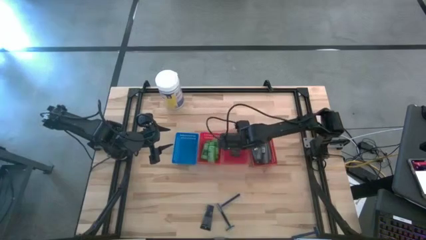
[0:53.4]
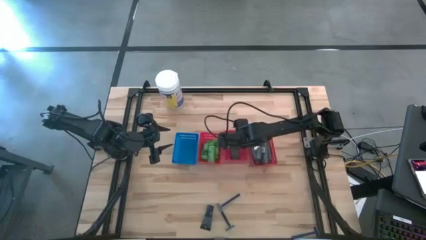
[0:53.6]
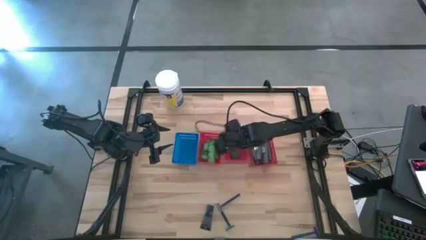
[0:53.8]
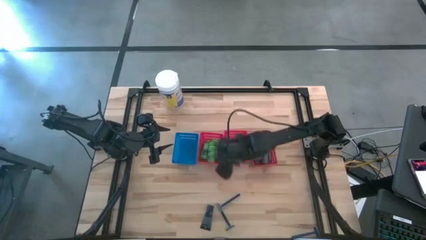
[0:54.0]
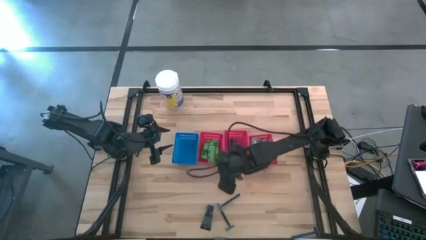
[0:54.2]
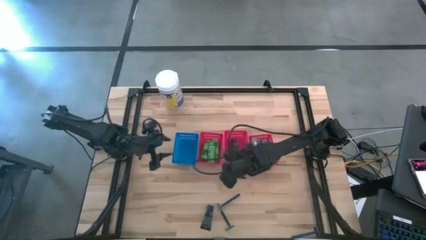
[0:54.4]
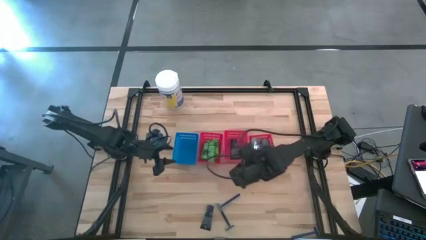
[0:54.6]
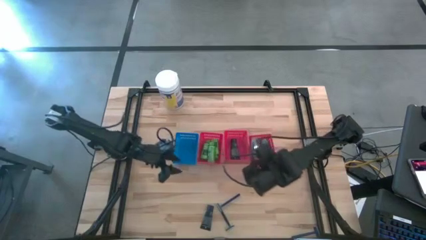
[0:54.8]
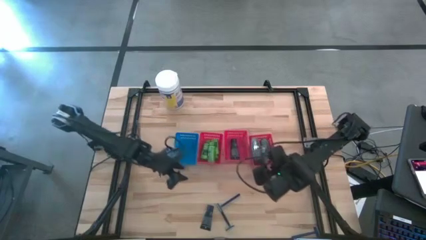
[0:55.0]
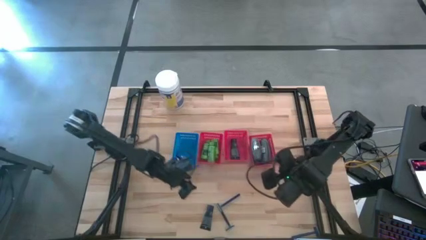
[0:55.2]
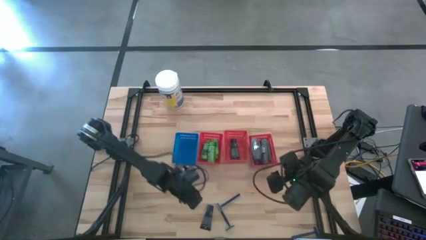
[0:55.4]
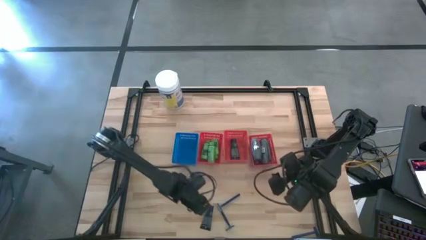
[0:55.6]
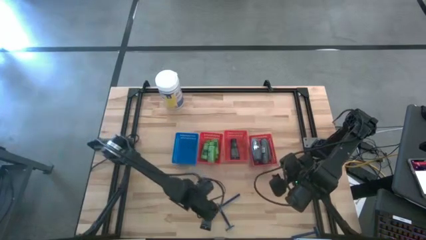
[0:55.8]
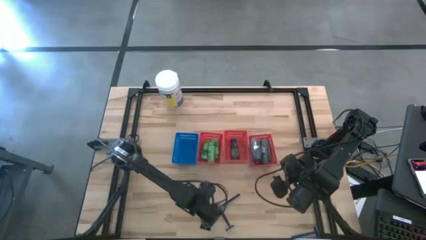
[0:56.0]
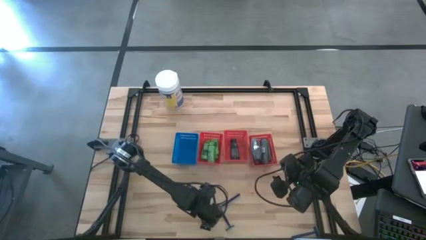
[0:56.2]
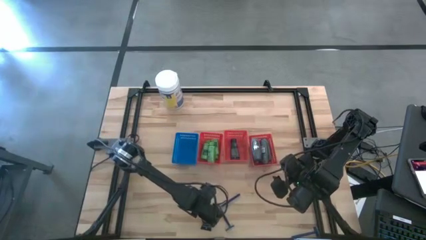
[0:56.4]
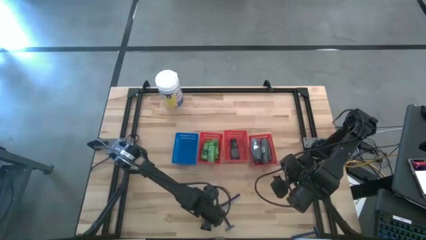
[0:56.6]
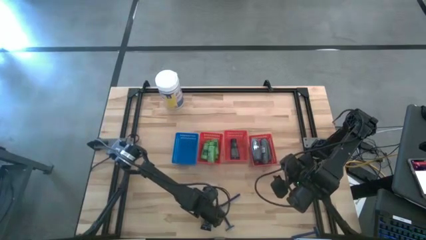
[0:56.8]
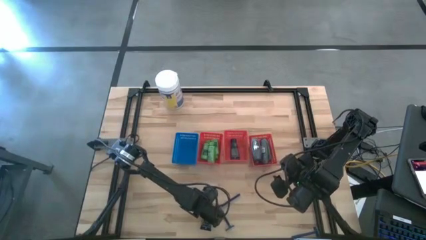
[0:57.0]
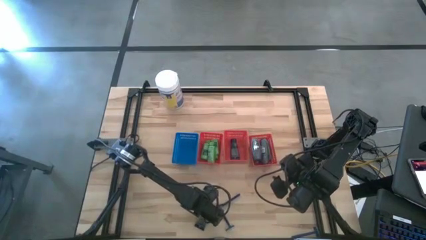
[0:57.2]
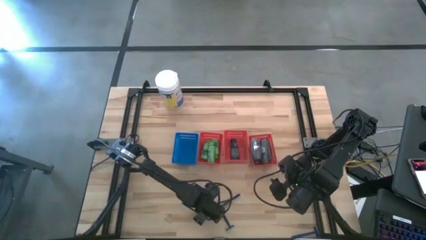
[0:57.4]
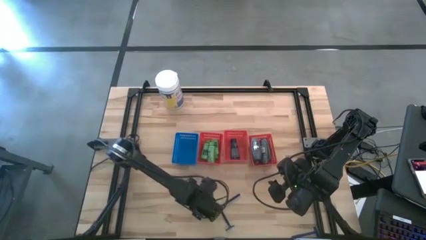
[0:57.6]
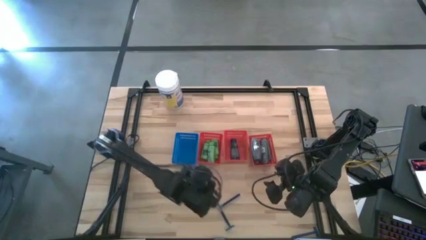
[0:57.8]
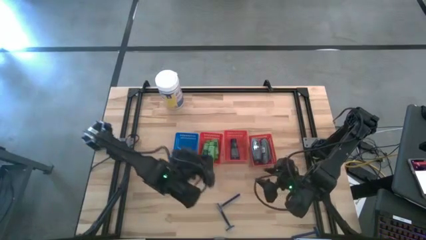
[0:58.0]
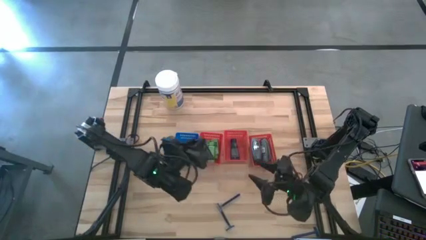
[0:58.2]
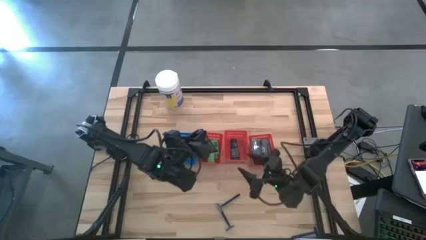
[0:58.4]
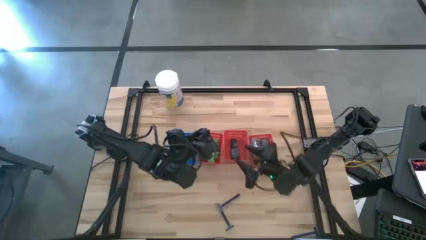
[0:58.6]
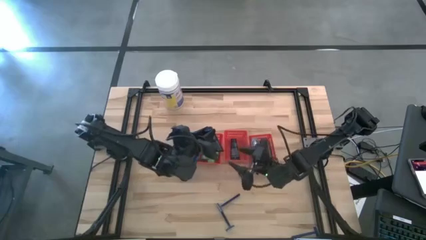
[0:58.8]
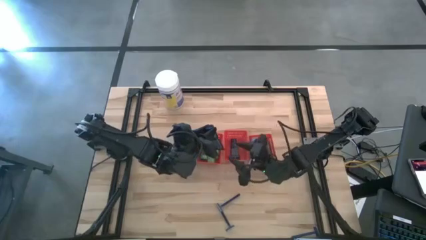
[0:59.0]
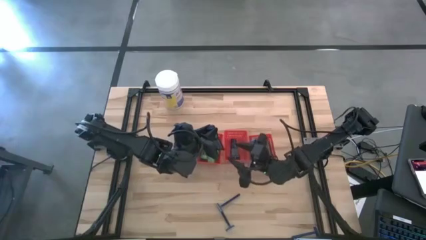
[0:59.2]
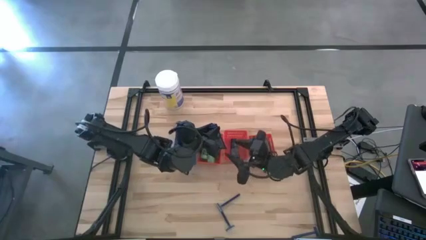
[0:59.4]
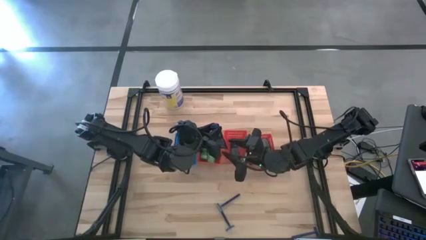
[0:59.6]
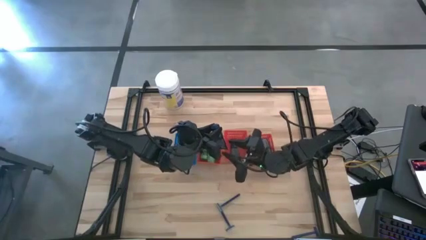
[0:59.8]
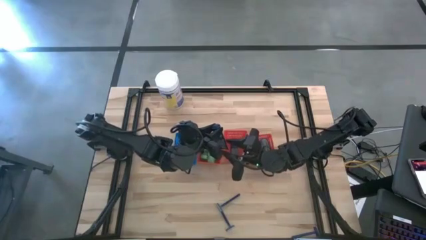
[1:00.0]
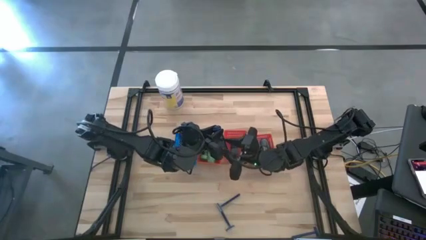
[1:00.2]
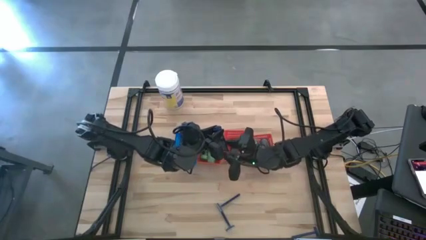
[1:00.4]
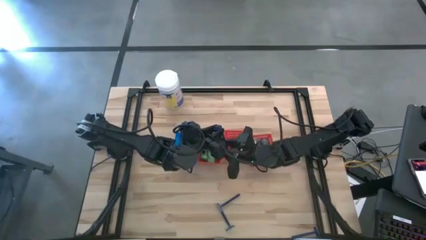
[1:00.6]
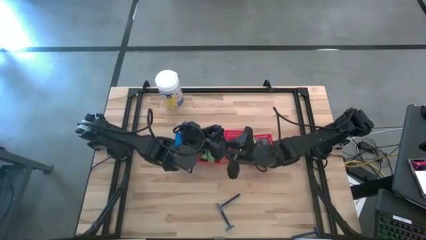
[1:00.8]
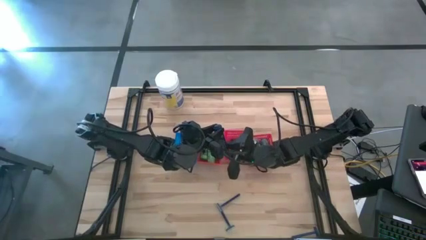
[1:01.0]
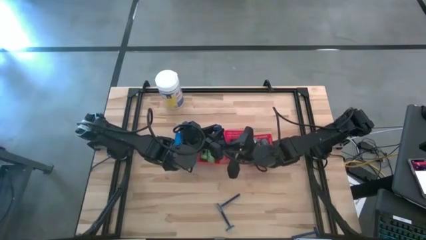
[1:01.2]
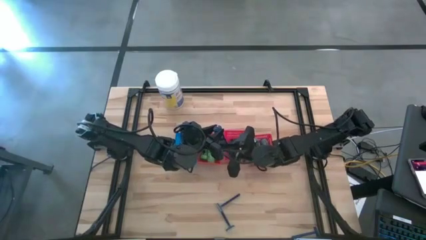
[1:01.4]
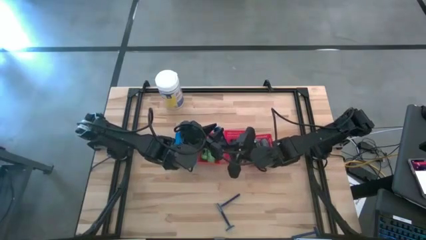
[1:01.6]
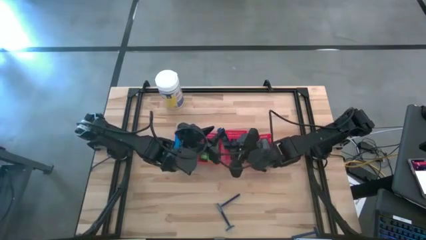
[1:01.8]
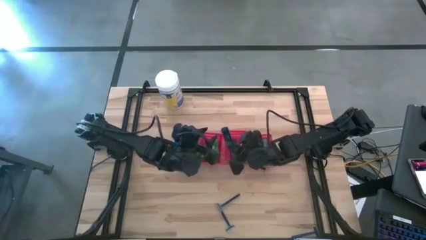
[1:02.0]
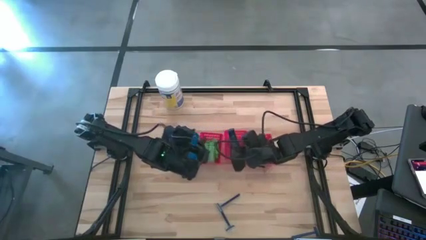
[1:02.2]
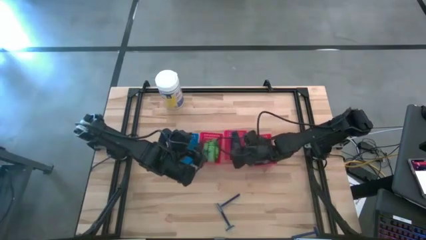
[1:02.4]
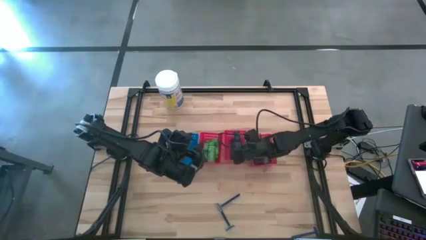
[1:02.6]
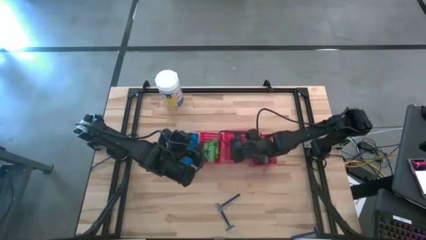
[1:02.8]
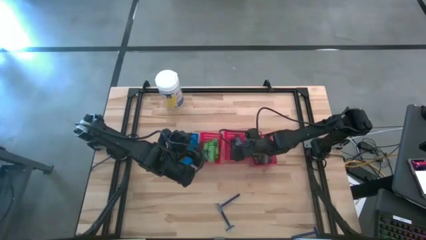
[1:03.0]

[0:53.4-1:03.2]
Task: Pick & Place Travel size toiletries
Put the blue shave cream into the middle red basket

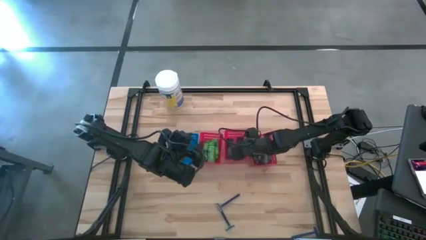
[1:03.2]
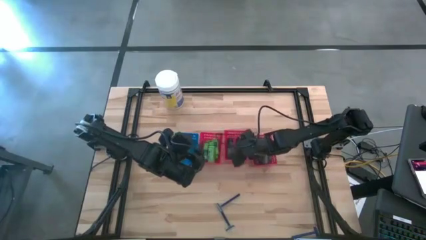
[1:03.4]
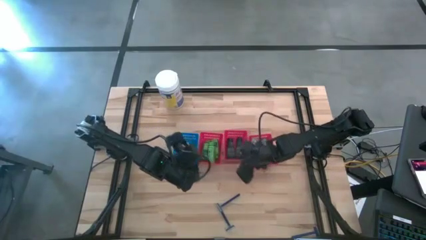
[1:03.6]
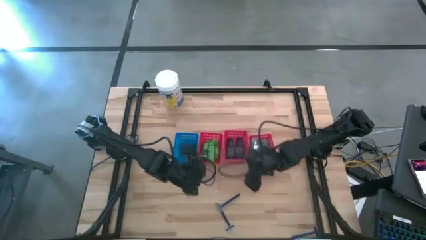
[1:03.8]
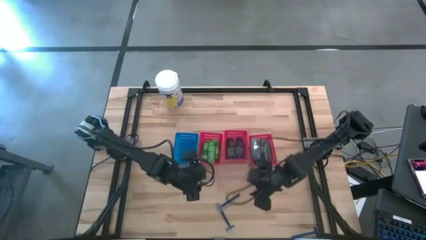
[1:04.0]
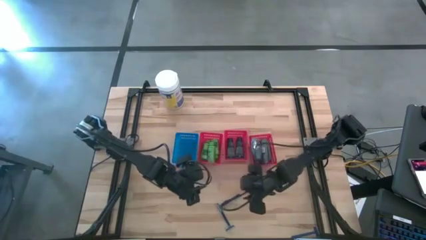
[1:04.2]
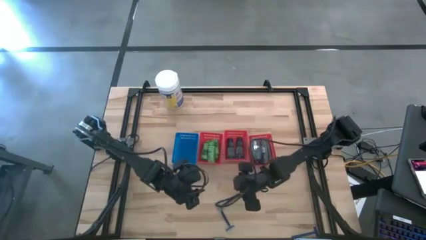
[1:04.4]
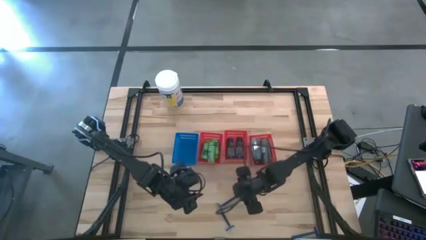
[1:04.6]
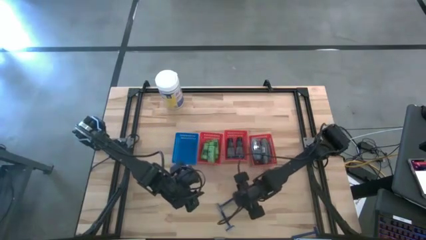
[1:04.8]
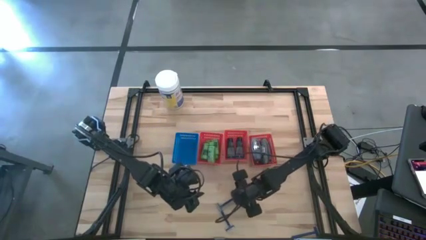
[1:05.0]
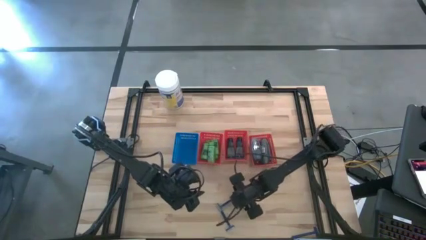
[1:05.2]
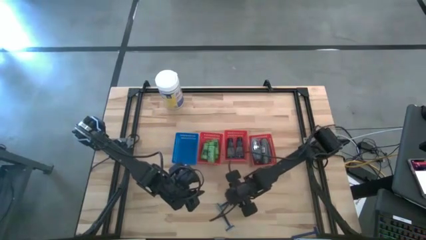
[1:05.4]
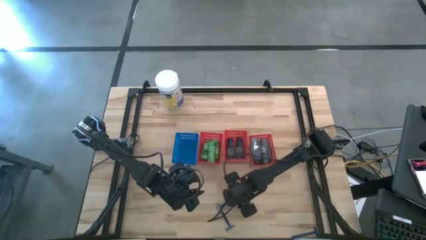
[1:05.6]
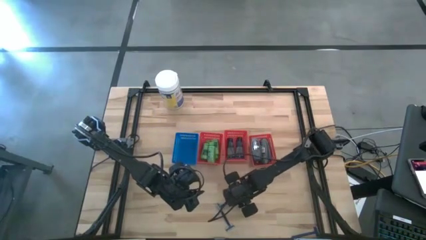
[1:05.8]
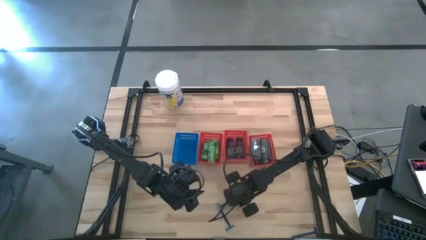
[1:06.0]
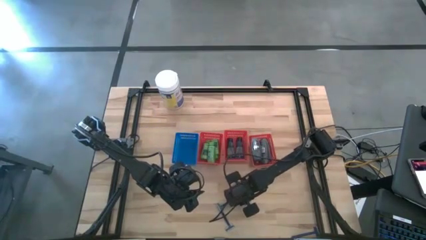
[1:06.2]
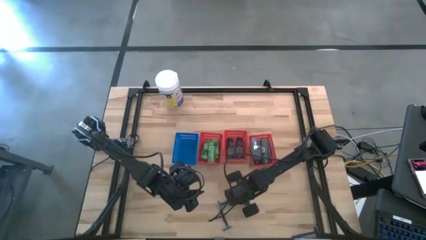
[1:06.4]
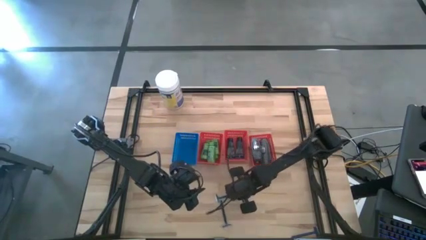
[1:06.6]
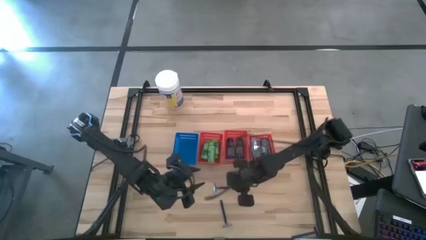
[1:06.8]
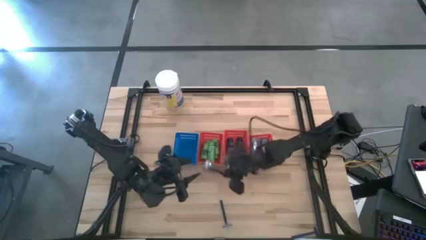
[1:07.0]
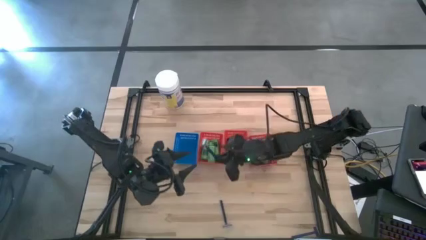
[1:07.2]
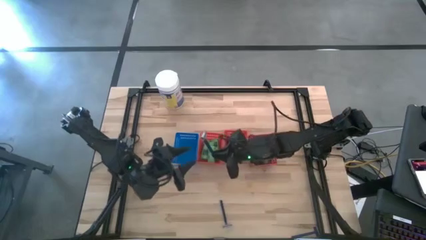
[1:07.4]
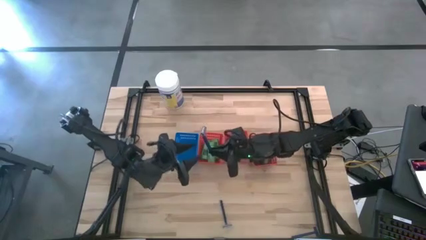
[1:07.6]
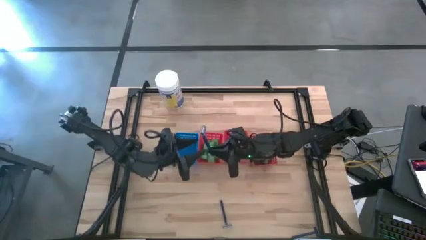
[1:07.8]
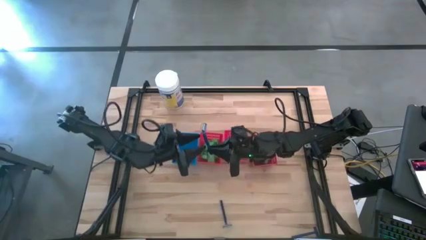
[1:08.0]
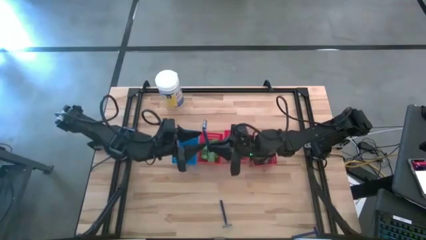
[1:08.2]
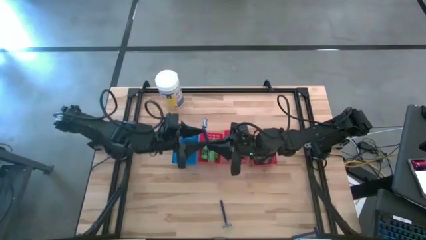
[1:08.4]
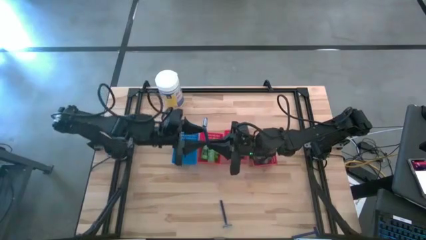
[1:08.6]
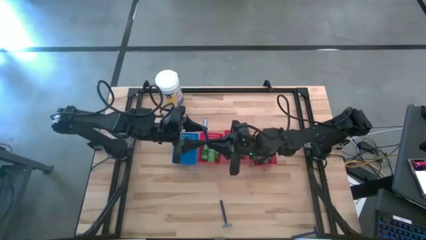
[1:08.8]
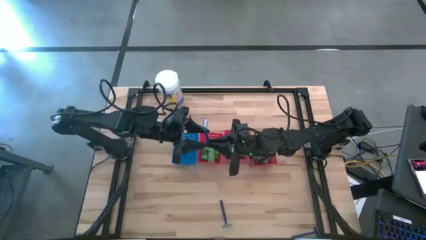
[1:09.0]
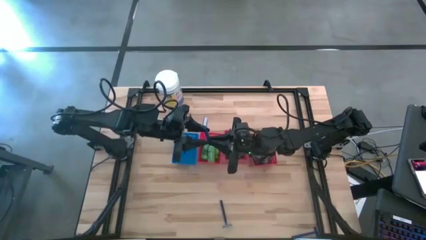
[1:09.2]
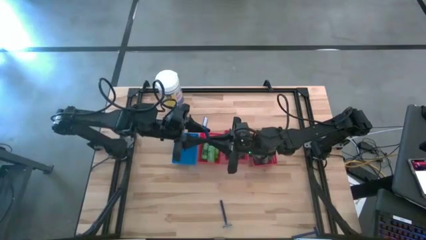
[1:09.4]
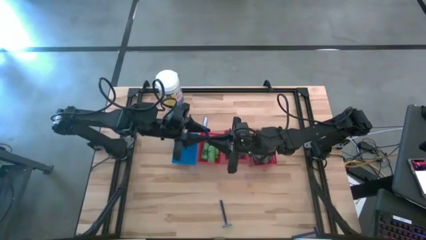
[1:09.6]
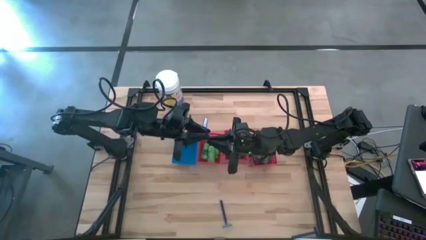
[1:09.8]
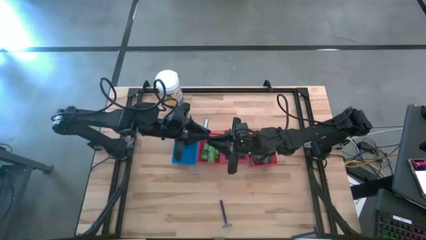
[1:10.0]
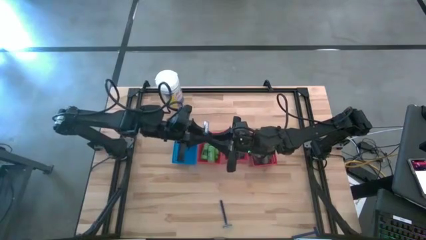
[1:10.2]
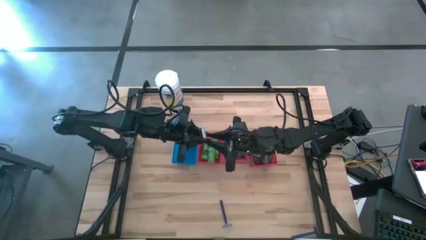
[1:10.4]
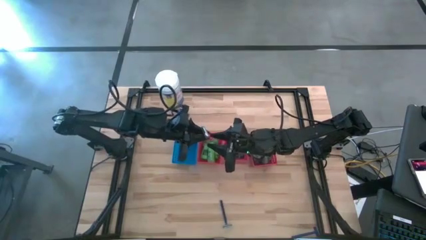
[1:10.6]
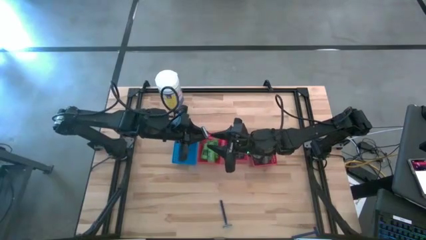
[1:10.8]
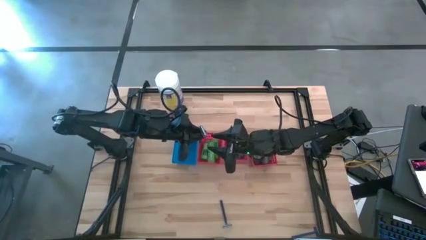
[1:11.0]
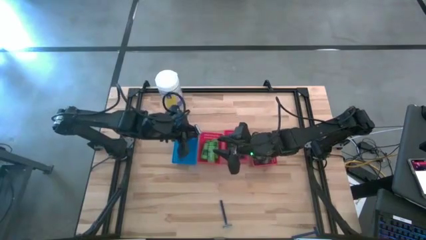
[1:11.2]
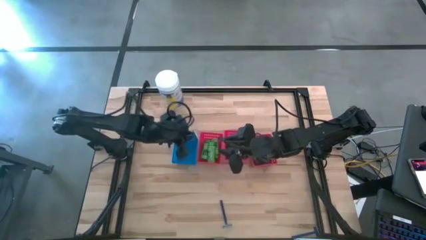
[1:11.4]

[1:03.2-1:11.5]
Put the blue razor into the blue basket
